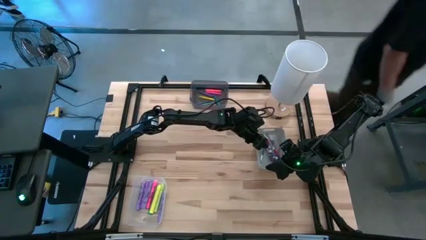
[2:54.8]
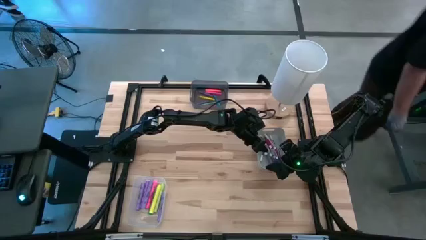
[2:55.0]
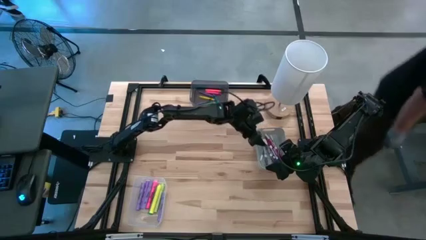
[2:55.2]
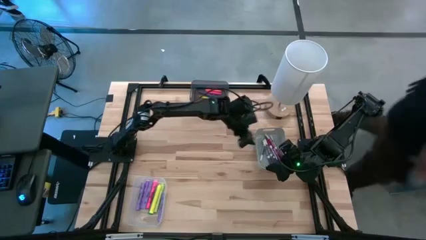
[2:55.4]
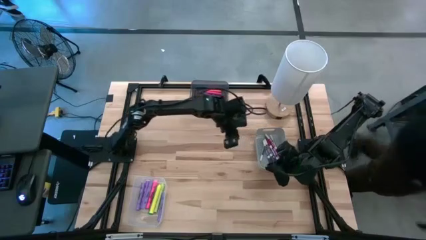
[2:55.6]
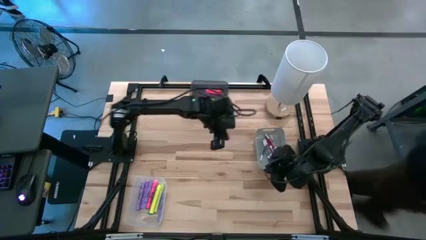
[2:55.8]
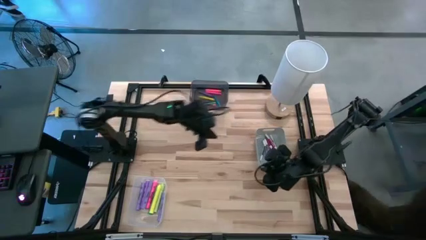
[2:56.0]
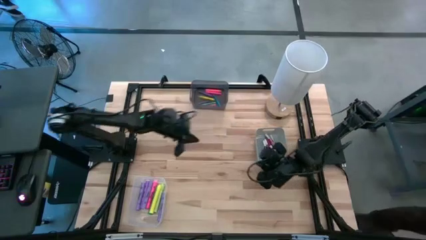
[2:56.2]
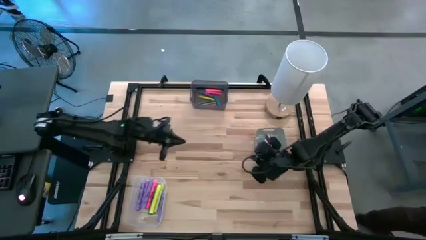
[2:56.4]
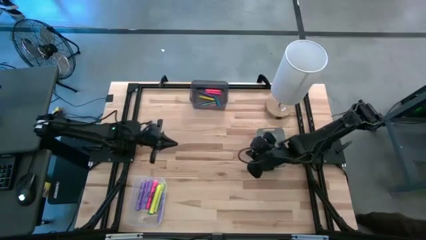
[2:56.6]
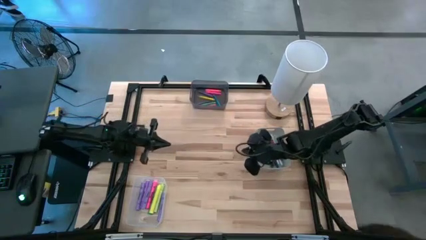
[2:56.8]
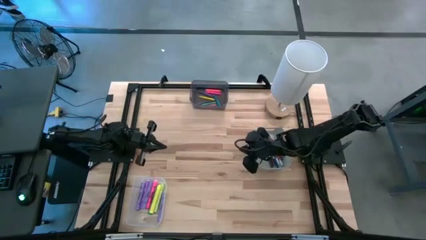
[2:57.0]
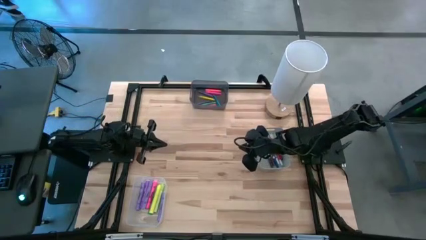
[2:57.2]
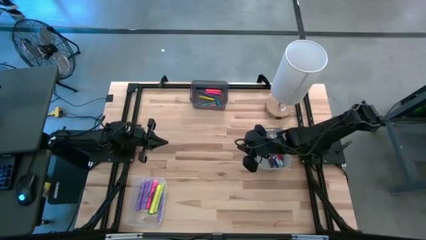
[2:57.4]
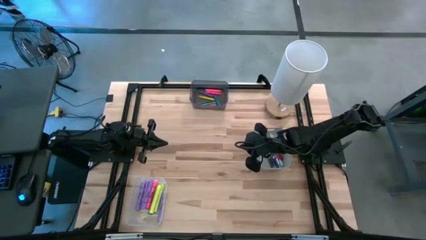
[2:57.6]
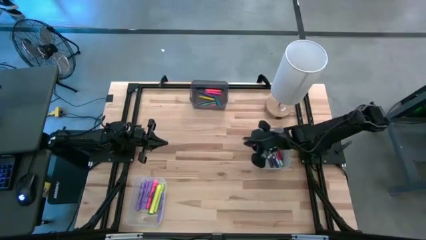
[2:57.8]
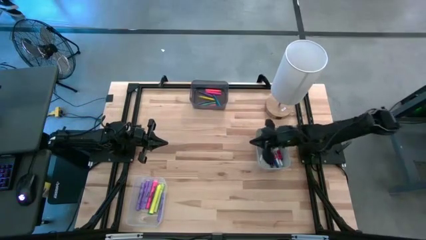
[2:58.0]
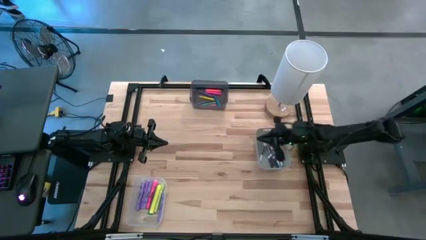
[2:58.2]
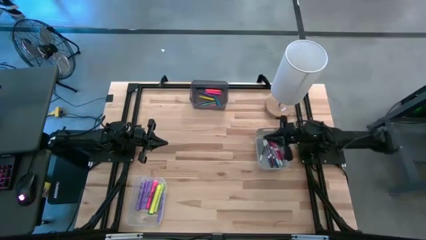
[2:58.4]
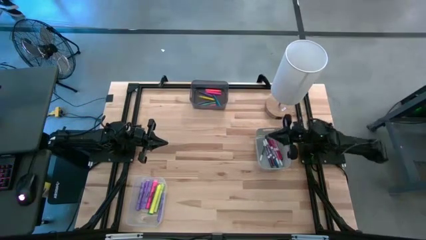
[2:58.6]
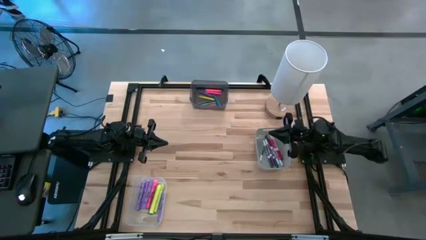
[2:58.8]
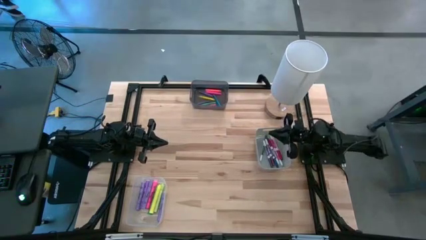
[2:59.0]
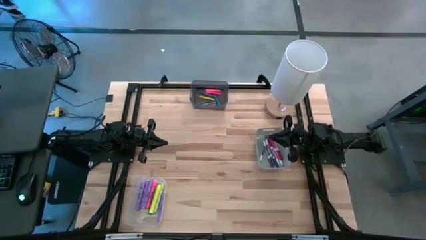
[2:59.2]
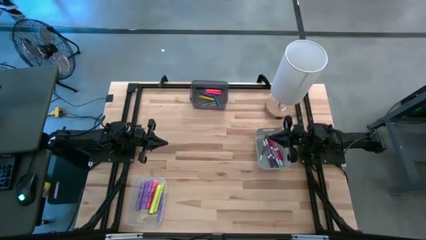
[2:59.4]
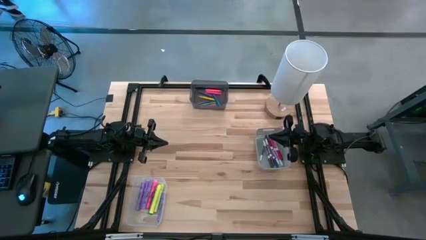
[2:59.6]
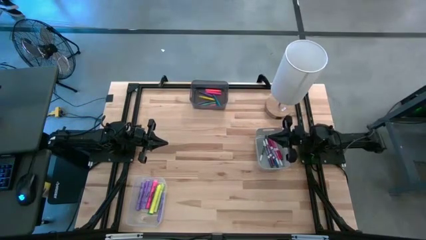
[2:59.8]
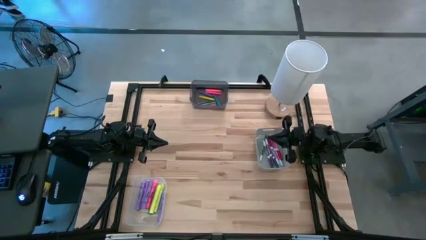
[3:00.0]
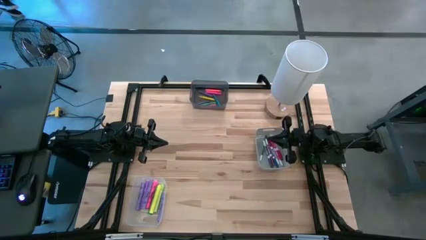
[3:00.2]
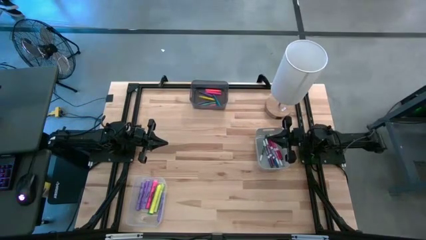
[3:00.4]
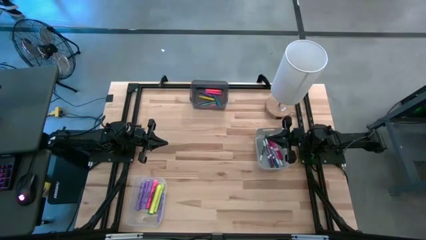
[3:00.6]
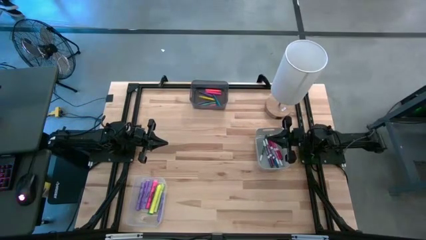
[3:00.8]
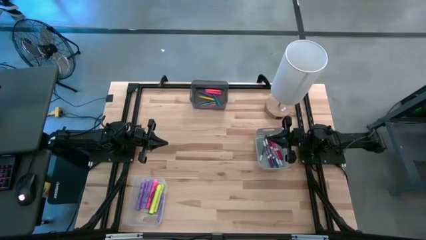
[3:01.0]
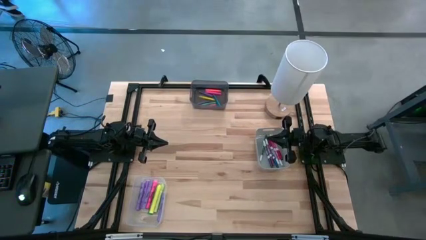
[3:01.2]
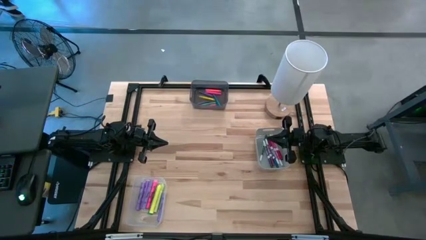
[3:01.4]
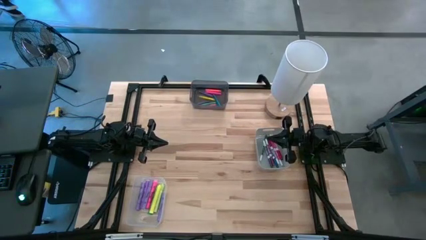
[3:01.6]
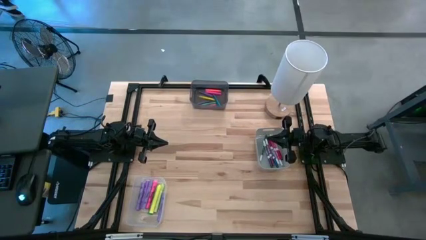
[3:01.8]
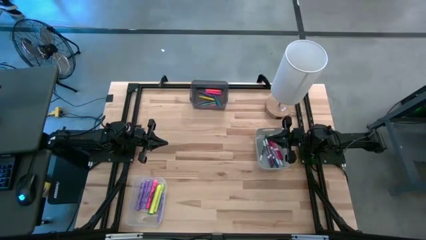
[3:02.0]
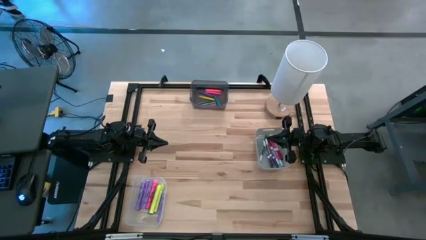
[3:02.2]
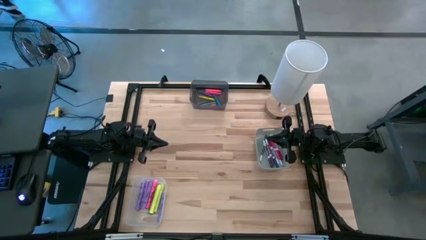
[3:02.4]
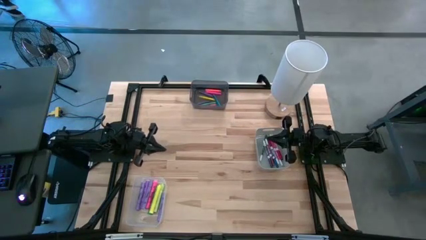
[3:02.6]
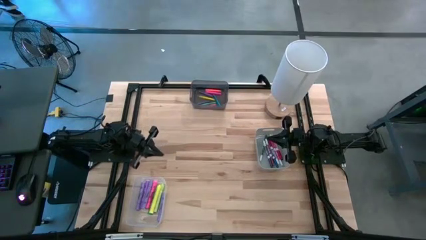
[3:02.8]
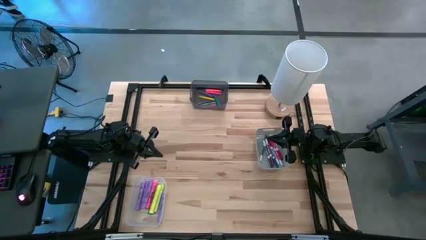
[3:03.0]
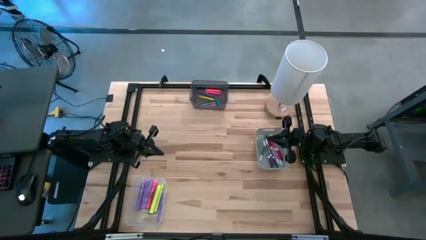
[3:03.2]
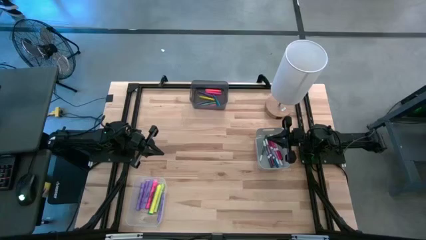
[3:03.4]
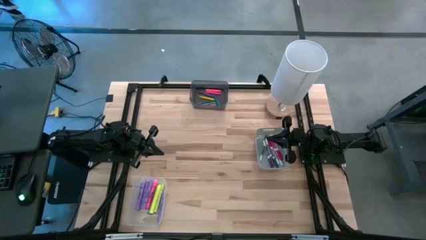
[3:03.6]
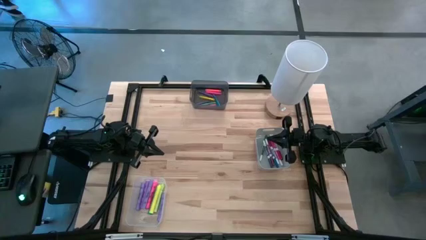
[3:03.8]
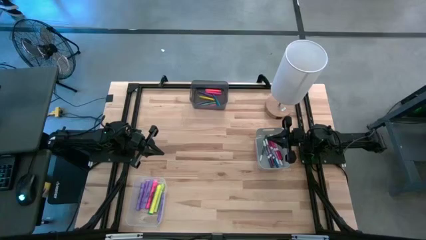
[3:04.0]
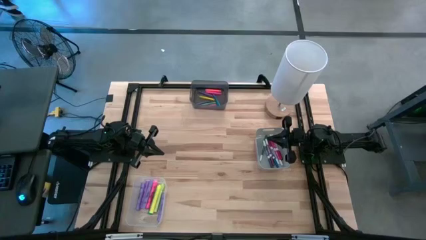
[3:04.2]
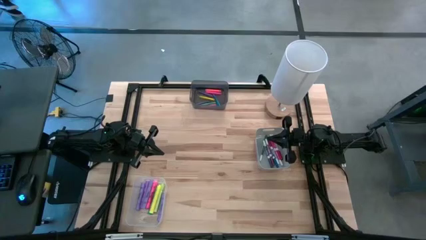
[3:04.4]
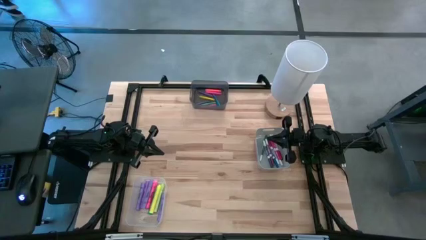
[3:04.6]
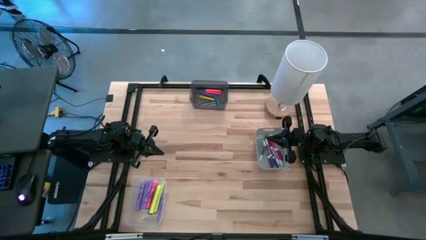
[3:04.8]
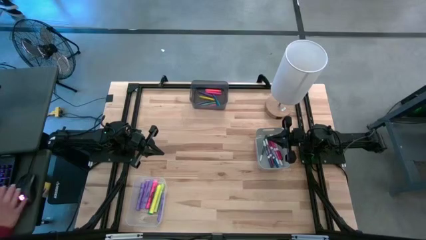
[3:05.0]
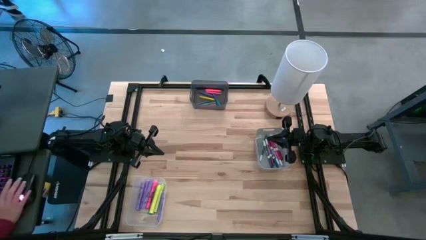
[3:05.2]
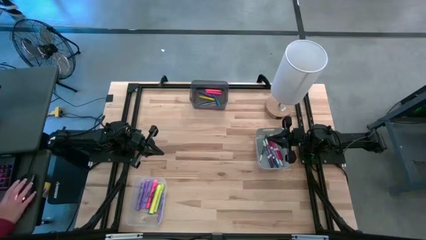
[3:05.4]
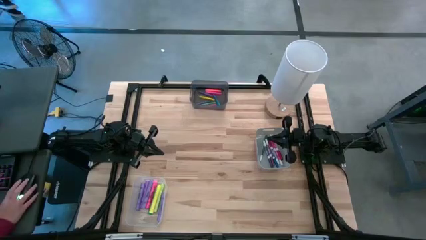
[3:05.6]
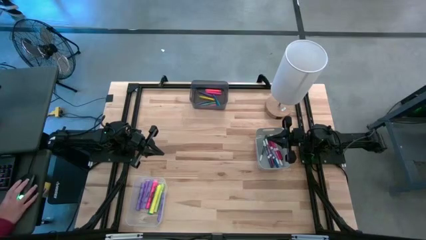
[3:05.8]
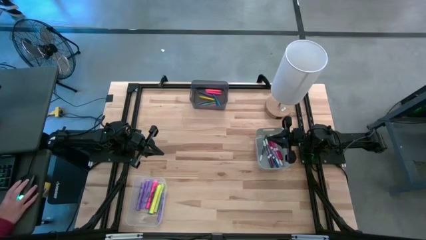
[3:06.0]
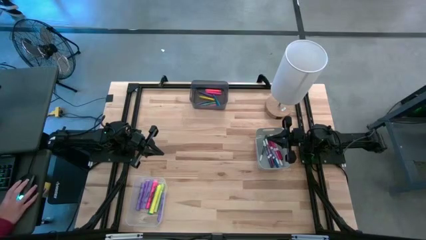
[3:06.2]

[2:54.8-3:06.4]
Task: Pick & Place Markers
Return to Home Position

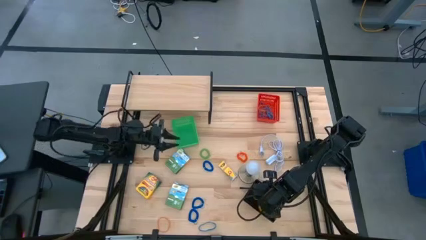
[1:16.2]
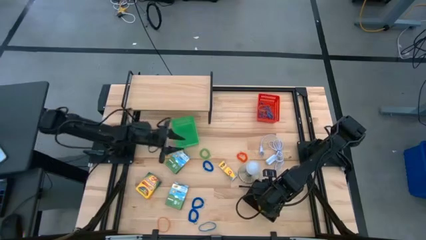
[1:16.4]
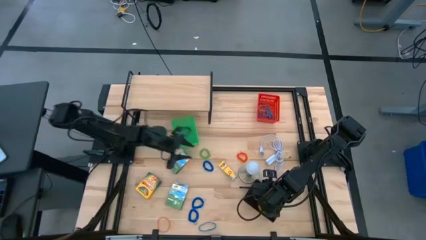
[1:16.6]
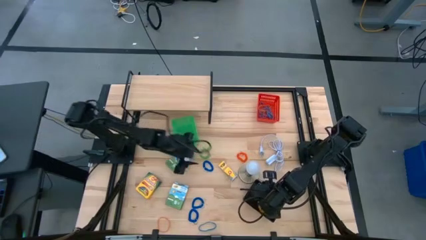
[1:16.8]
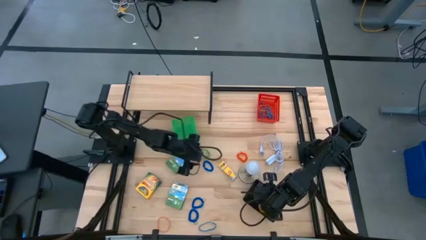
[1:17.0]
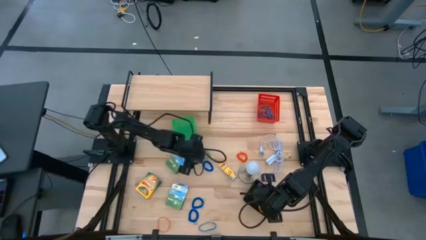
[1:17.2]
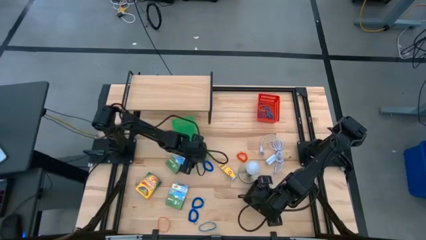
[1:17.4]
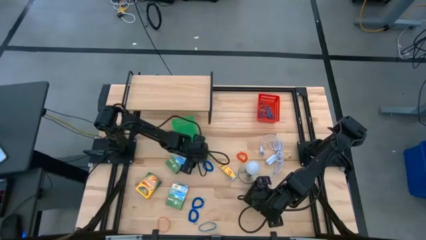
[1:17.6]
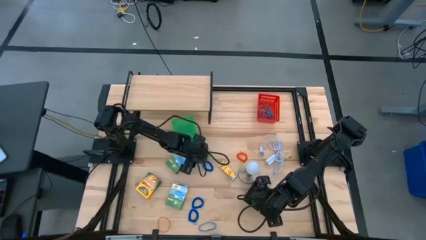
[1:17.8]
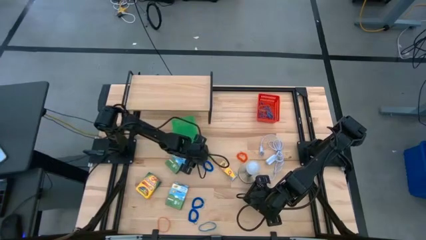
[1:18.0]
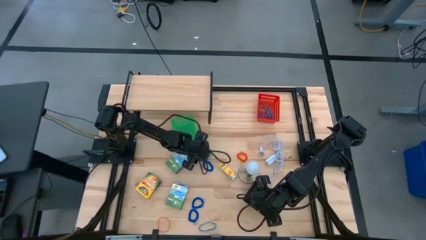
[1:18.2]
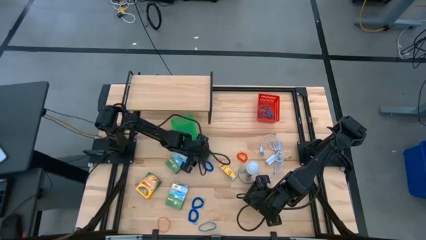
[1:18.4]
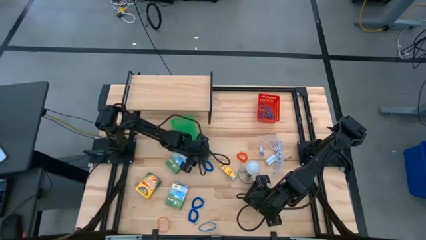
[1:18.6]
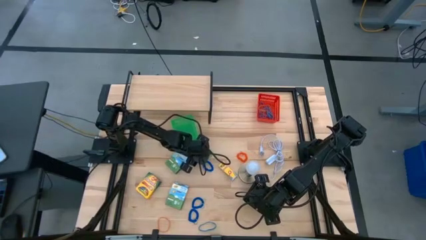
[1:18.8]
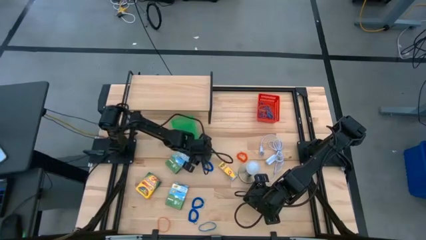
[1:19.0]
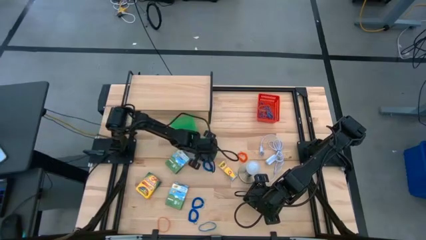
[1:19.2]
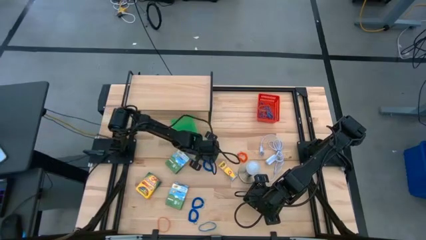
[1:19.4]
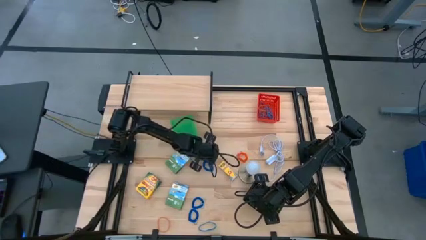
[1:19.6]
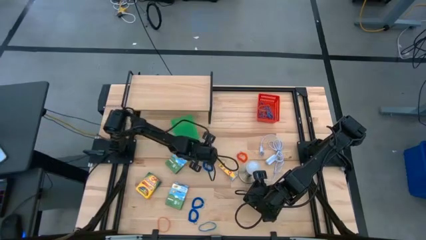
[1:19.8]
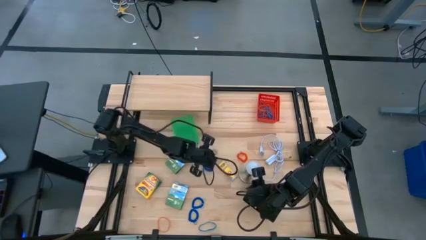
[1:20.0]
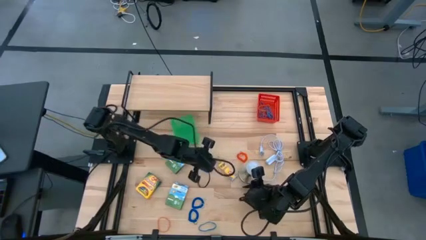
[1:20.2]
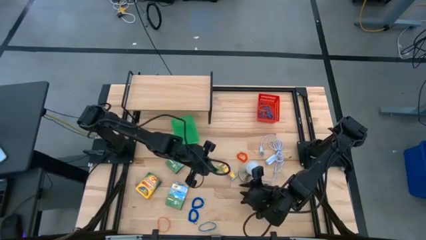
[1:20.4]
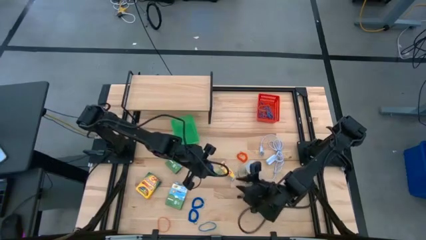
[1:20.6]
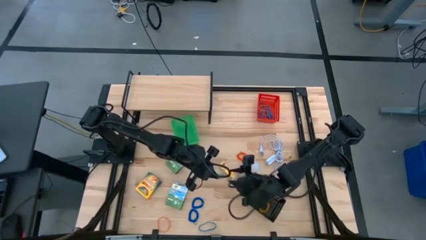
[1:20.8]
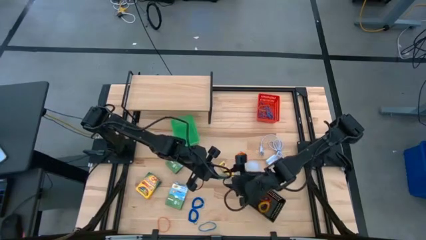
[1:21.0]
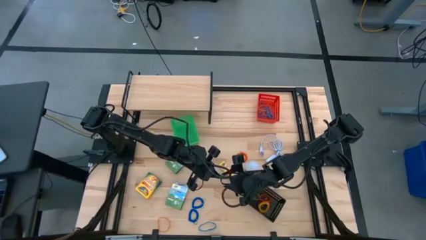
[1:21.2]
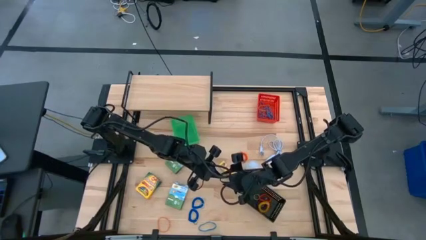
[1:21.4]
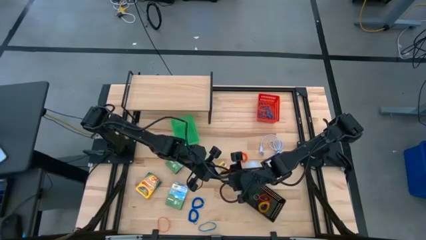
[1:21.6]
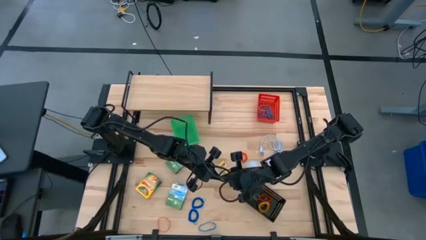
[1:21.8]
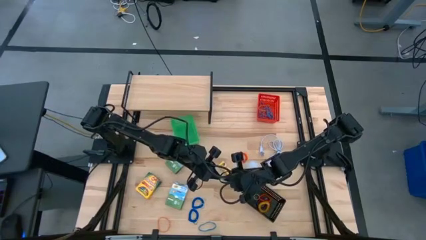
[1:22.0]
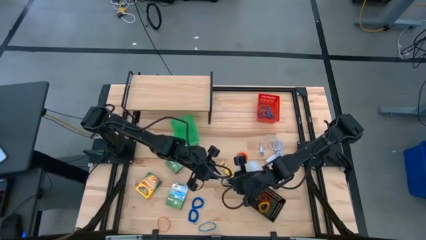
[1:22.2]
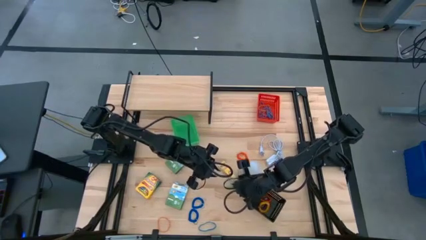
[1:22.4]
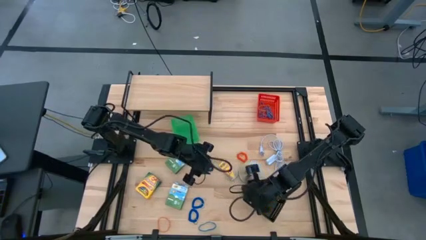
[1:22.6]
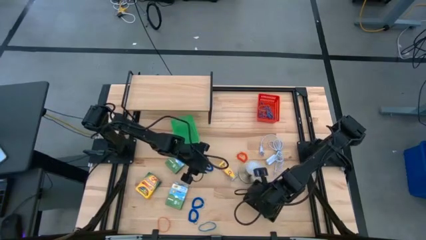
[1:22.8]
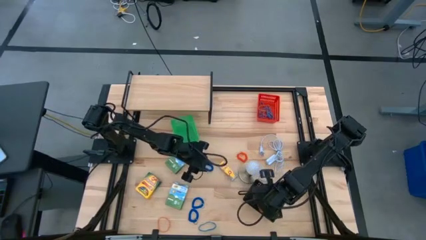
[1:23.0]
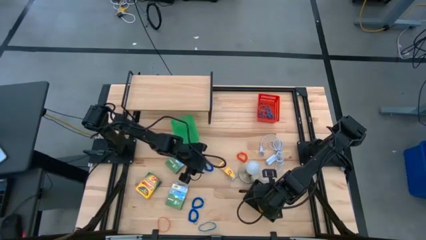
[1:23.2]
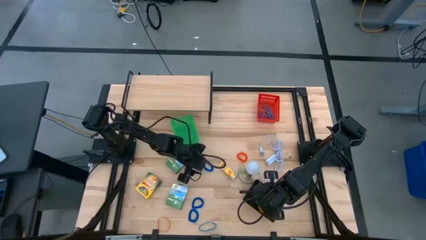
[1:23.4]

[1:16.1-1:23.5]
Task: Pick & Place Office Desk Supplies
Put the green spring keychain into the black basket
